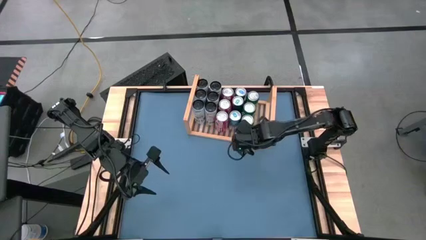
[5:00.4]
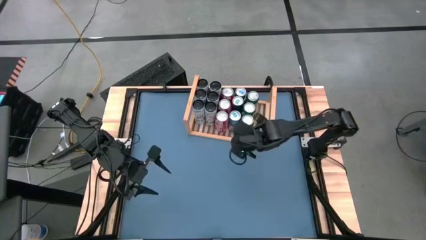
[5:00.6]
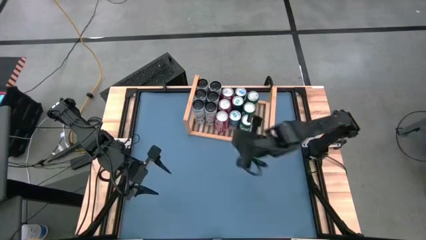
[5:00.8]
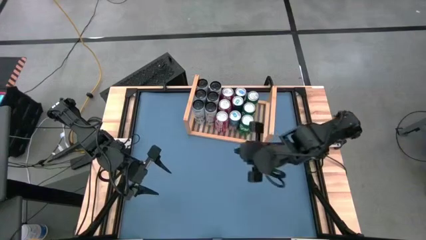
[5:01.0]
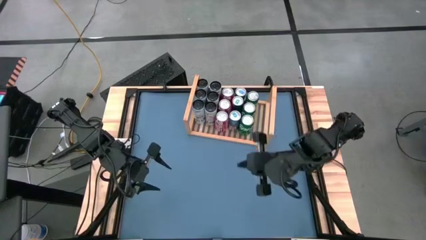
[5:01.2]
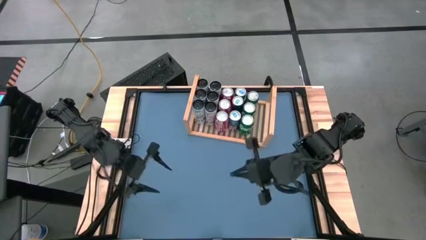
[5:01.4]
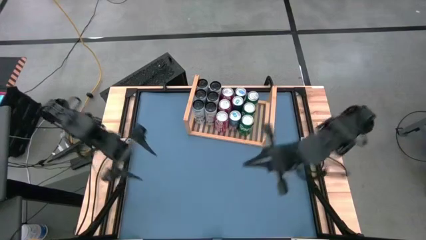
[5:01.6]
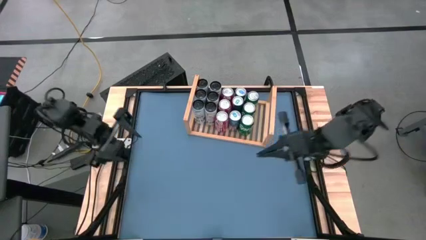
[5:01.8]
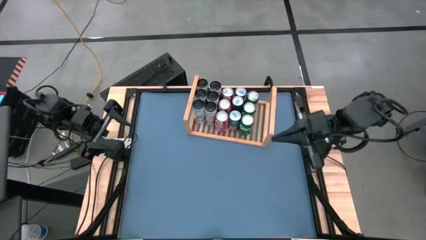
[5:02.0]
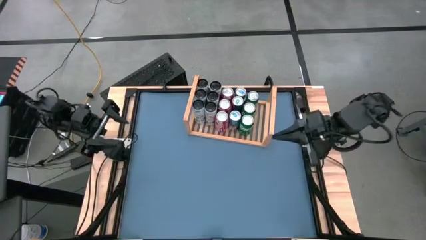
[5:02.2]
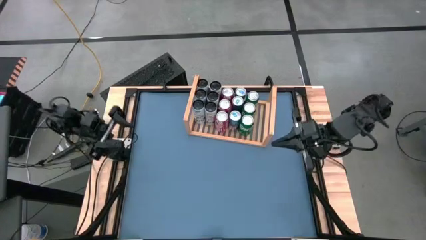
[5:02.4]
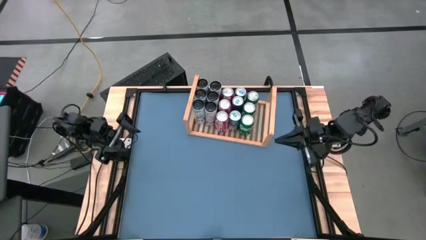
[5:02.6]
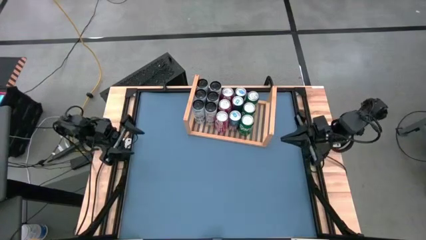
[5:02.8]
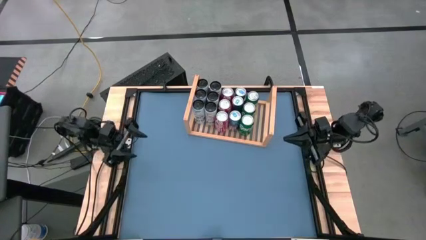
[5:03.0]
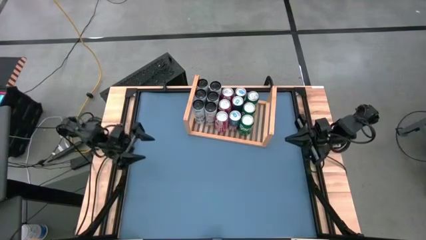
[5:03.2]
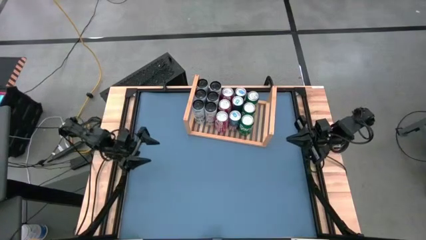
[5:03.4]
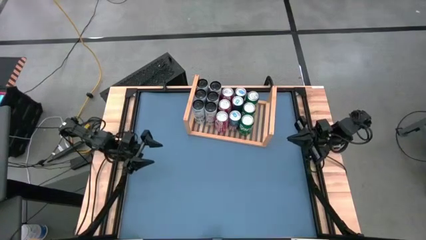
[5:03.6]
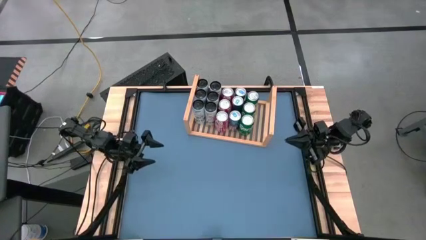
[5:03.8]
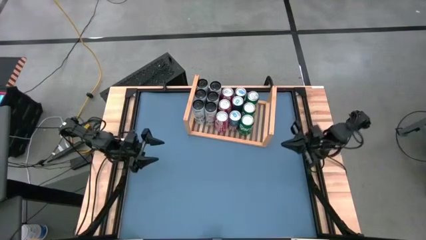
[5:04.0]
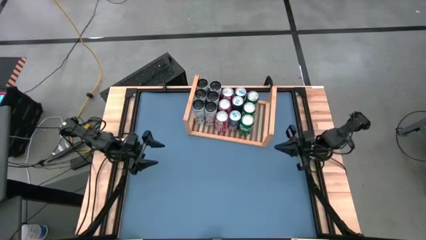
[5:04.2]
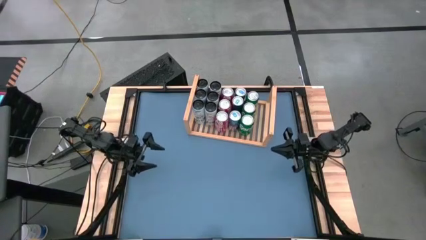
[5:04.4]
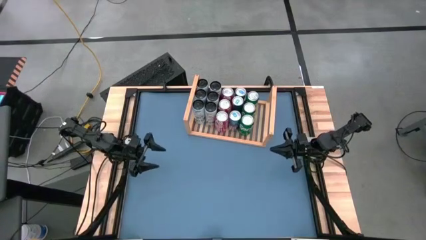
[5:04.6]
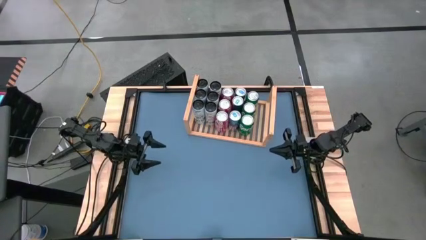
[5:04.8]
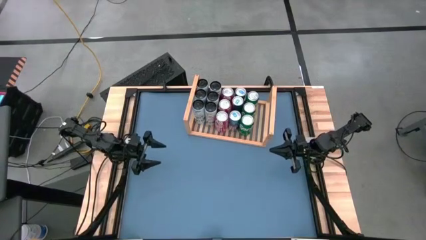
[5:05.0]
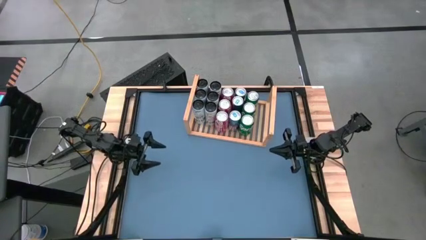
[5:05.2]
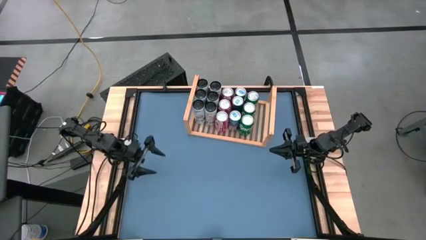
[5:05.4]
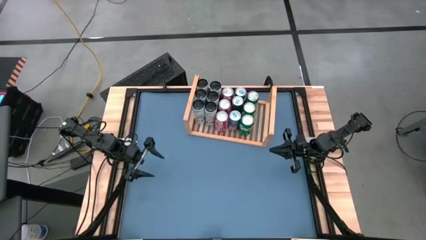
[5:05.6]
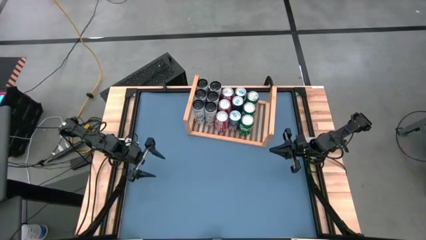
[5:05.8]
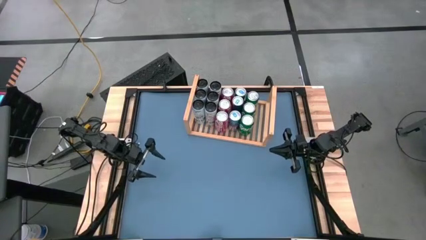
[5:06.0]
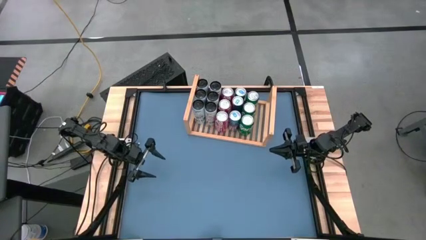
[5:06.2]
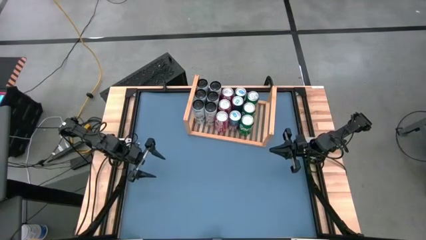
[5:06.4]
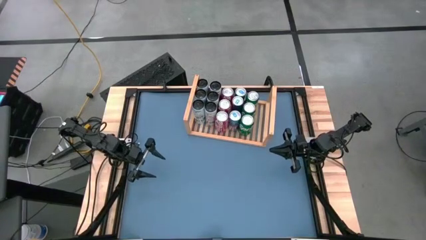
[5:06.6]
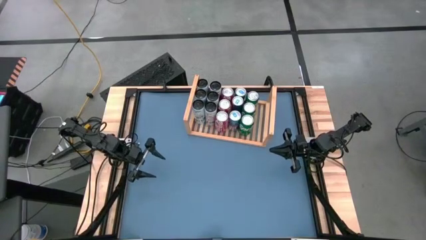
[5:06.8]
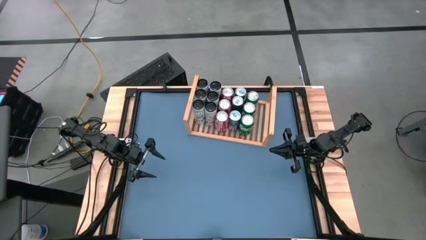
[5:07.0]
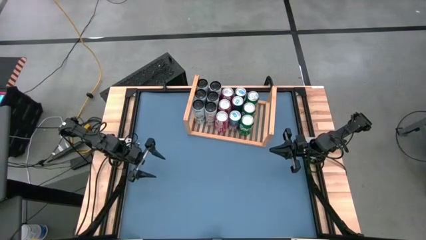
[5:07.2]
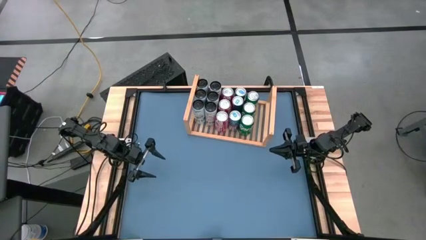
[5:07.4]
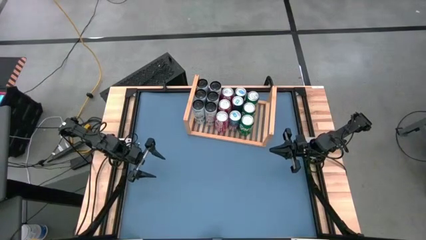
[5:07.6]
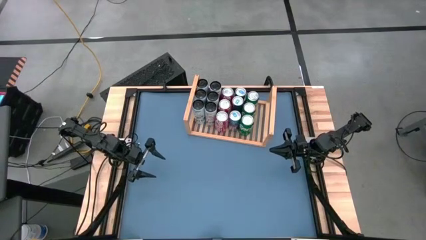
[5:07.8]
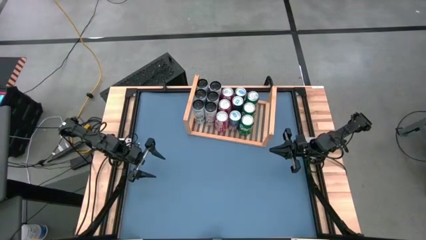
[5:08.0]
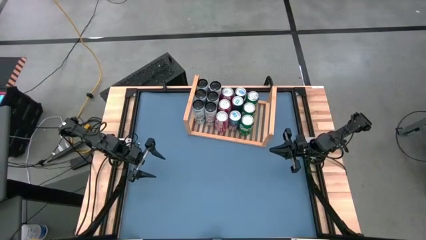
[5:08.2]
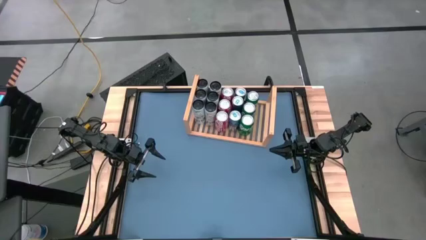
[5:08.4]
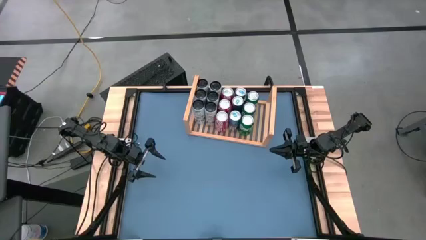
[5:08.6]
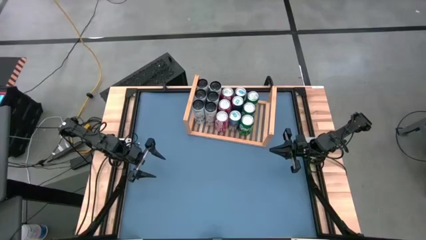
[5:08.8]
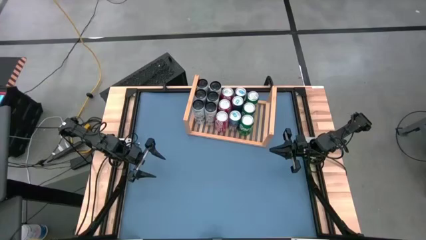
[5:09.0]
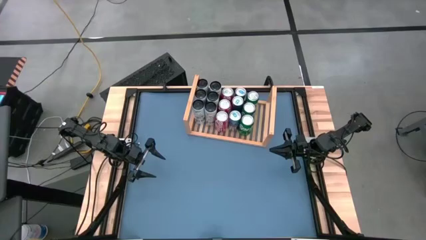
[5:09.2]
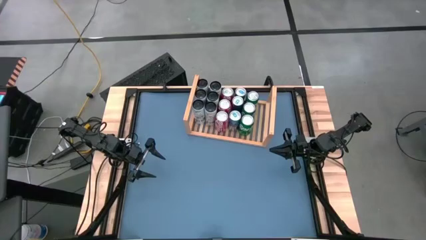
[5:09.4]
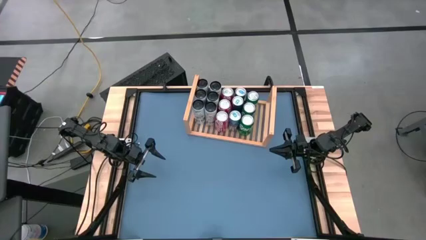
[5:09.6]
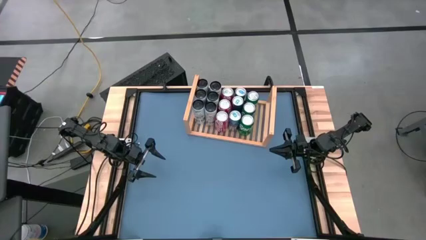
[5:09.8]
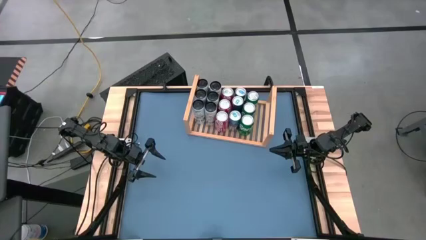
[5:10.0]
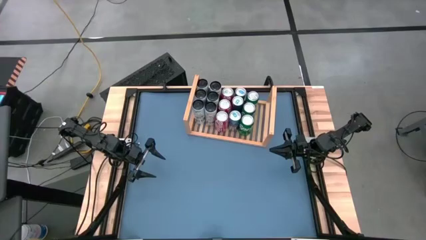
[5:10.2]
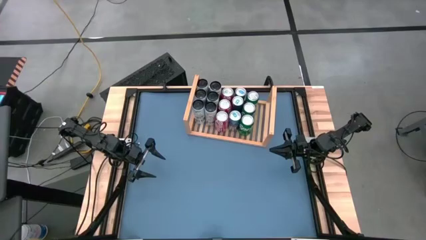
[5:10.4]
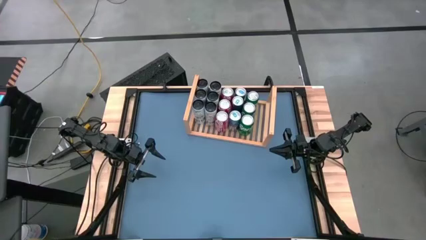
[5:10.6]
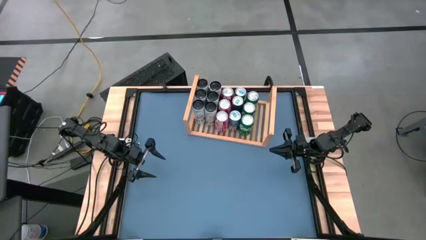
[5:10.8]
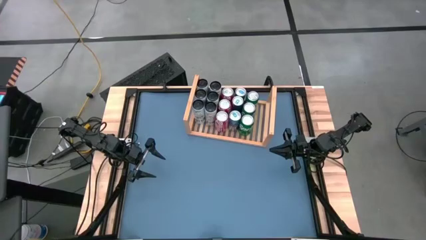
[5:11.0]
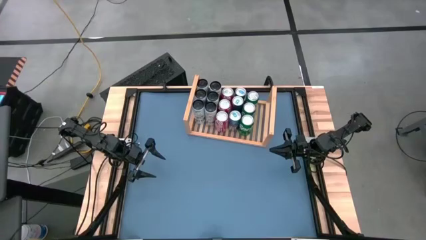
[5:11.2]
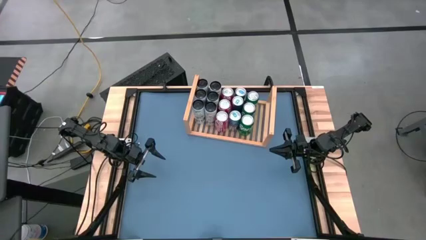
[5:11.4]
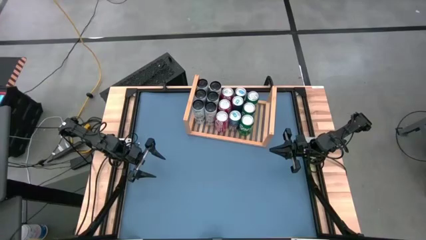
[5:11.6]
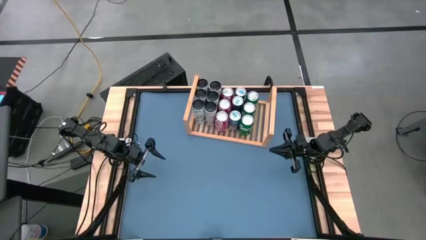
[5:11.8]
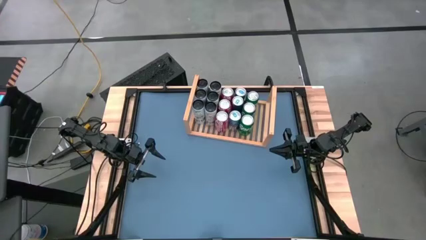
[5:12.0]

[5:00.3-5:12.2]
Task: Place canned beverage on shelf
Return to Home Position

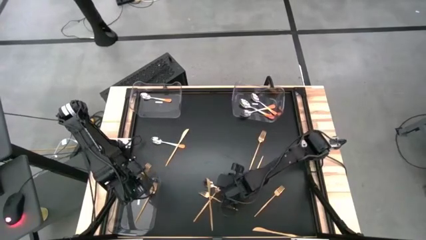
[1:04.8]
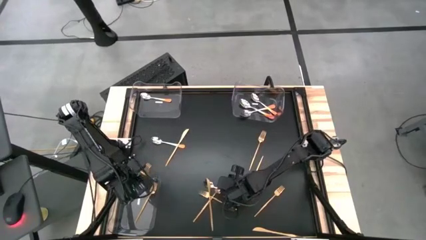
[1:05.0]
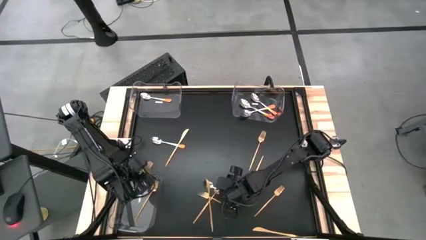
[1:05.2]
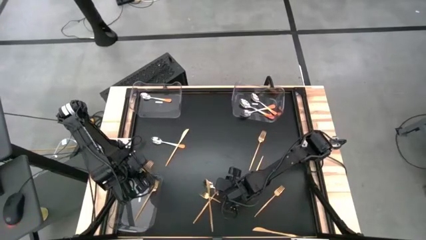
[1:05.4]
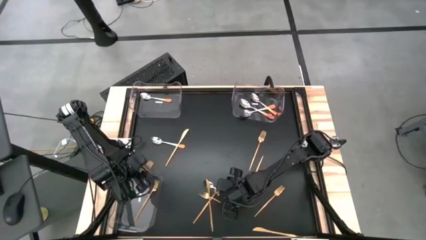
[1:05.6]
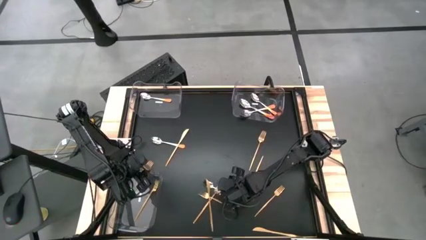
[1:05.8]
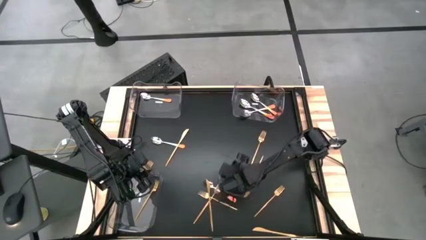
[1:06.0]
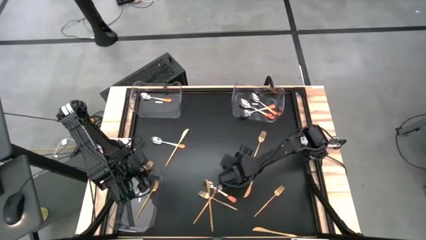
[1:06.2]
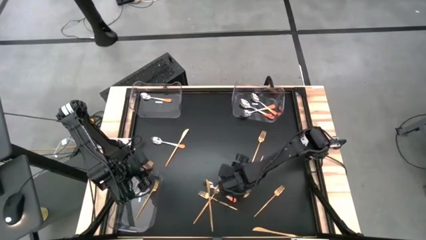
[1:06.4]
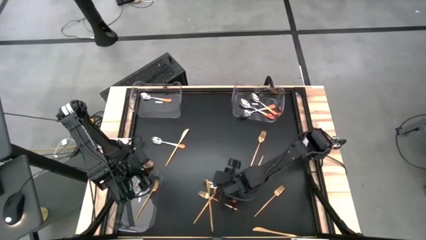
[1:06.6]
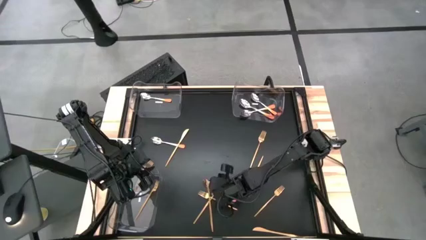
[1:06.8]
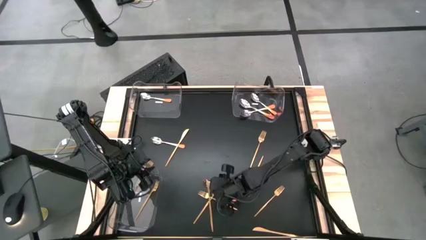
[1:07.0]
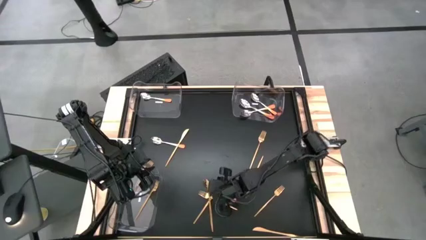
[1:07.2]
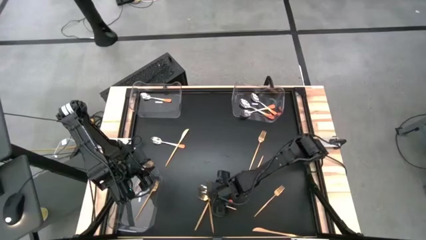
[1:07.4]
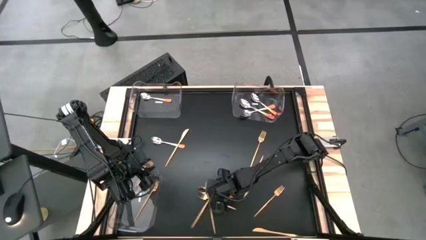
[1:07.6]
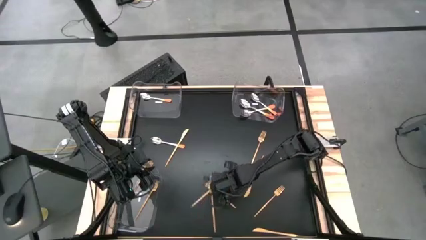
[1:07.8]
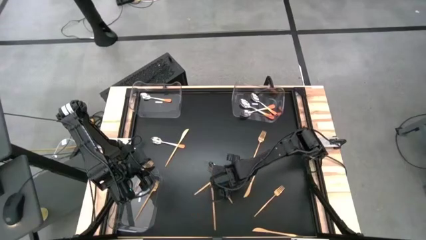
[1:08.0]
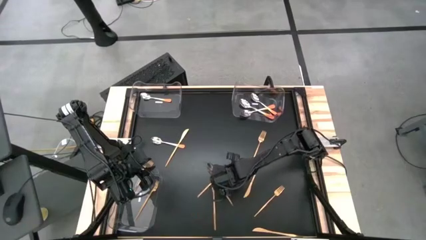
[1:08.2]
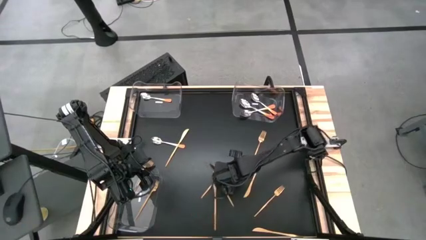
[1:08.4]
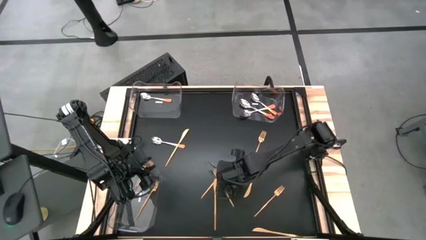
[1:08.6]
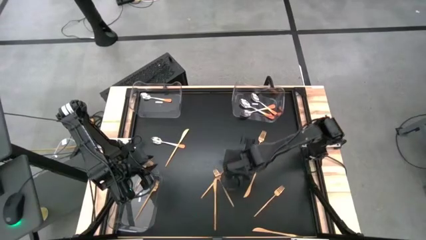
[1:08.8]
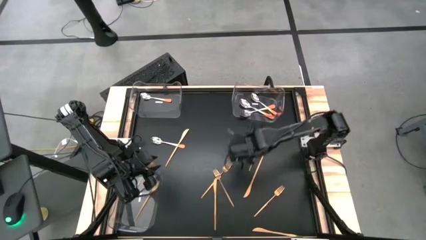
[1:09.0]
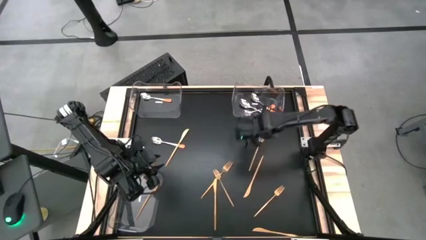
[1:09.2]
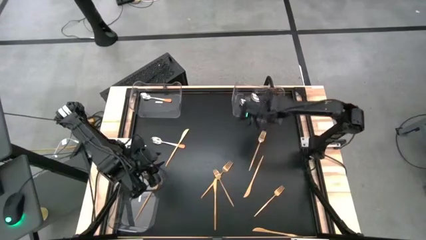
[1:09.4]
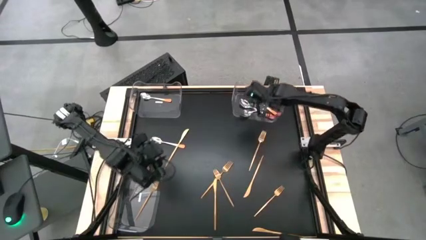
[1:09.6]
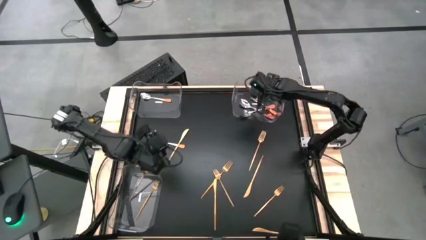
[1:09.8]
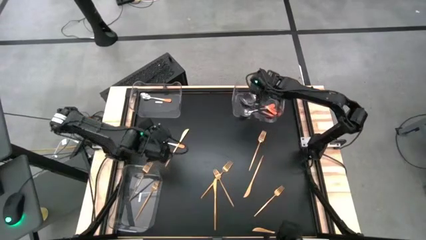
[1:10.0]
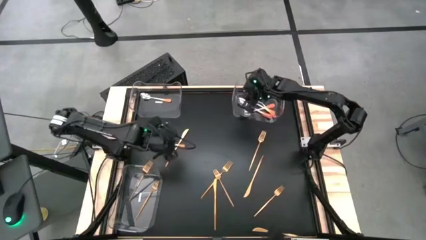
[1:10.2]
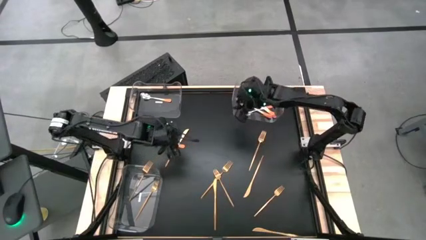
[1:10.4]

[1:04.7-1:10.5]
Task: Sort silverware by color (type)
Put the silver and orange spoon into the top right transparent bin
